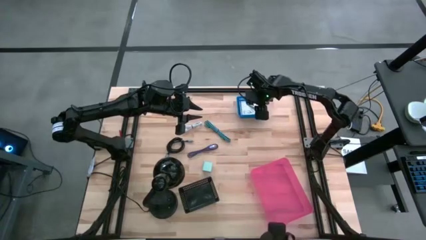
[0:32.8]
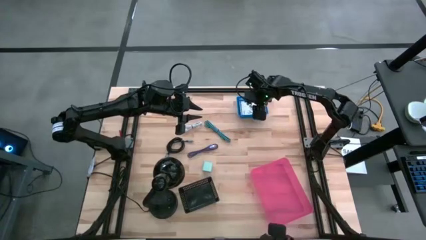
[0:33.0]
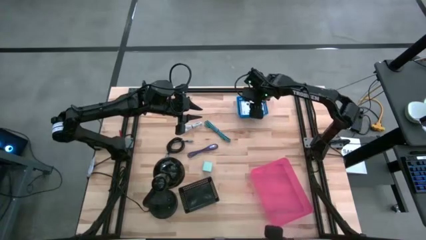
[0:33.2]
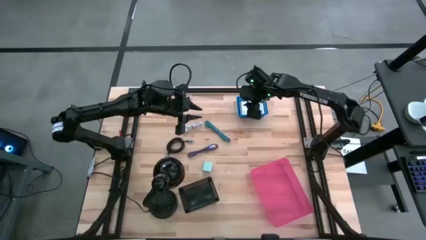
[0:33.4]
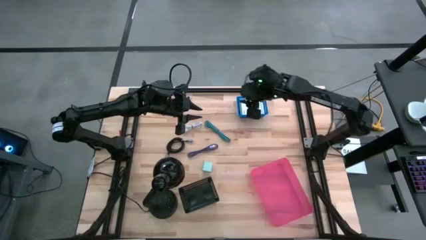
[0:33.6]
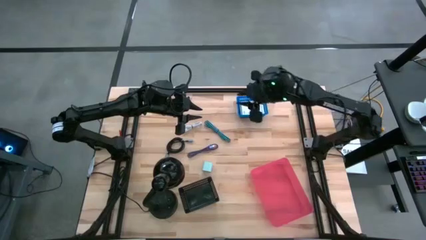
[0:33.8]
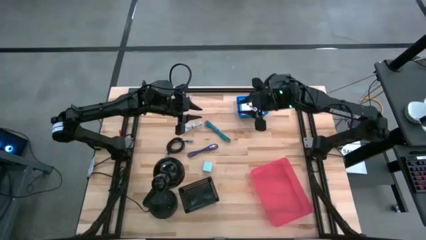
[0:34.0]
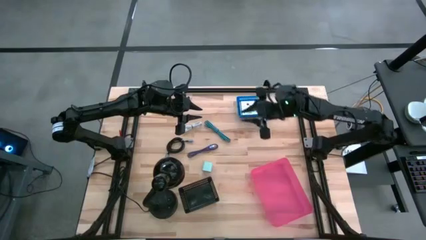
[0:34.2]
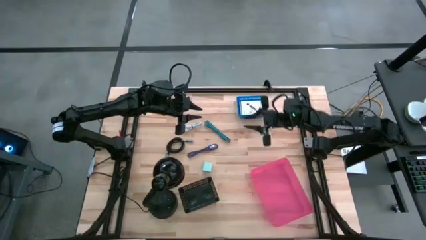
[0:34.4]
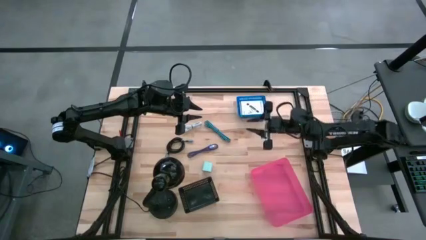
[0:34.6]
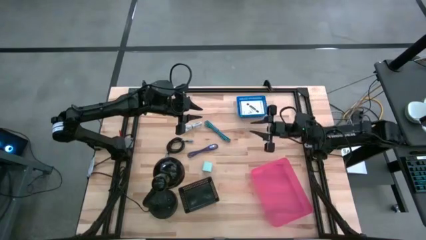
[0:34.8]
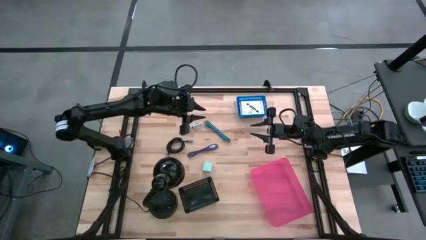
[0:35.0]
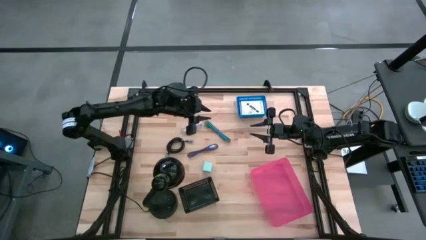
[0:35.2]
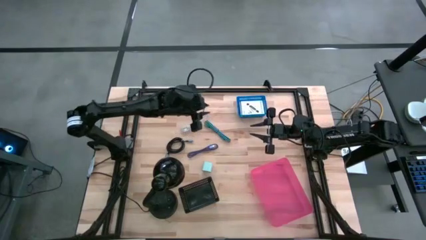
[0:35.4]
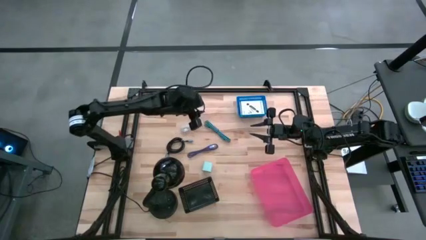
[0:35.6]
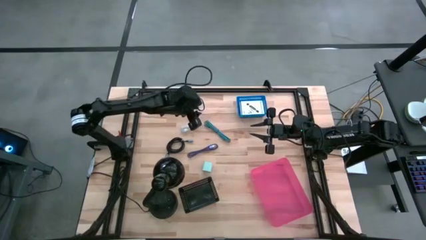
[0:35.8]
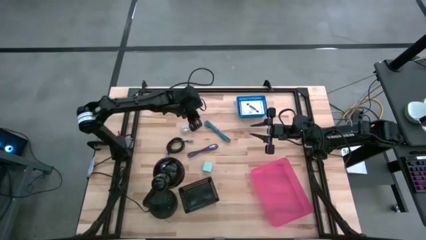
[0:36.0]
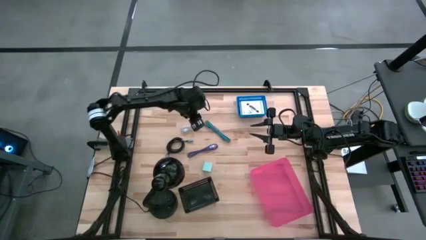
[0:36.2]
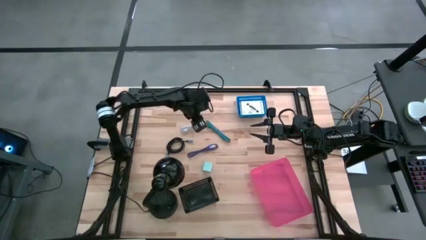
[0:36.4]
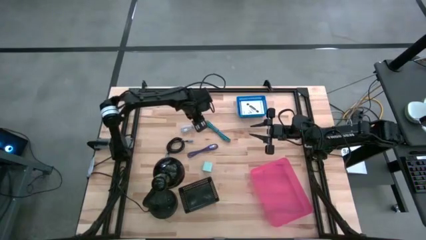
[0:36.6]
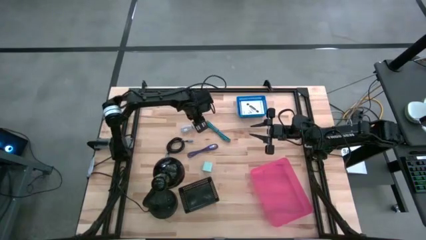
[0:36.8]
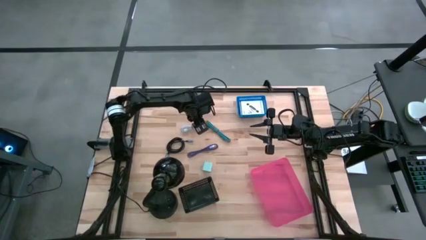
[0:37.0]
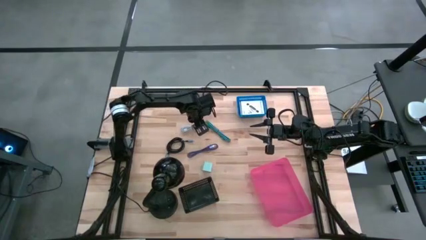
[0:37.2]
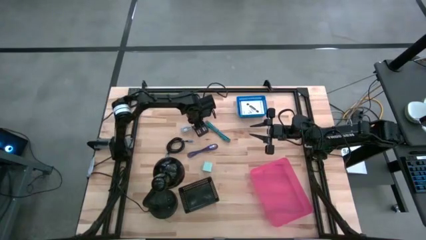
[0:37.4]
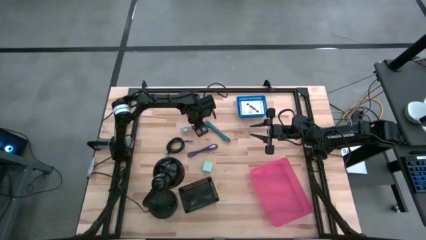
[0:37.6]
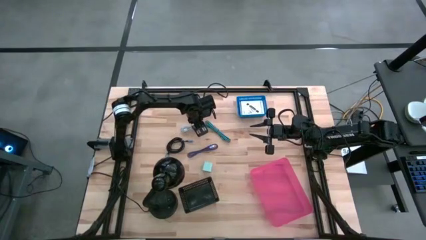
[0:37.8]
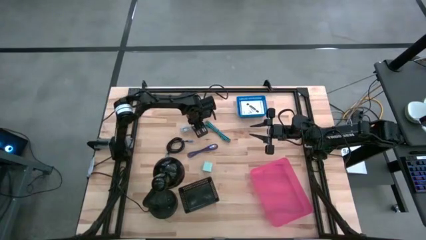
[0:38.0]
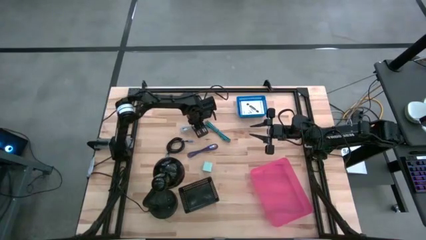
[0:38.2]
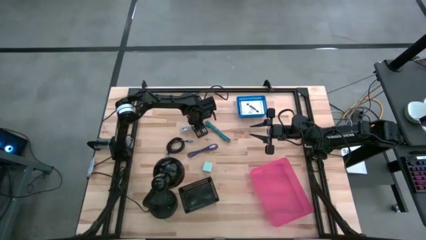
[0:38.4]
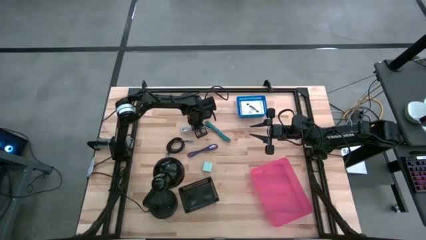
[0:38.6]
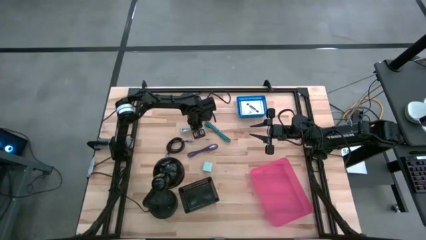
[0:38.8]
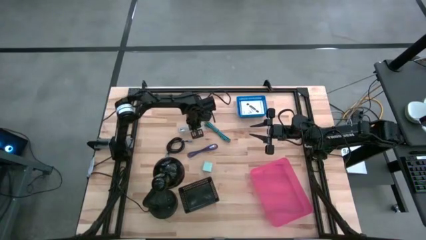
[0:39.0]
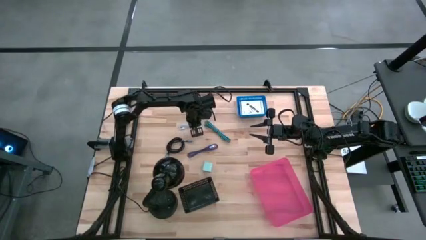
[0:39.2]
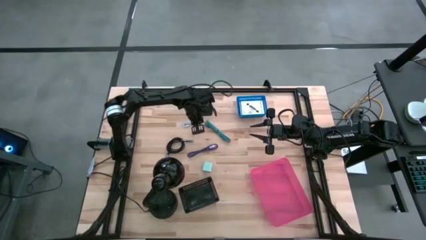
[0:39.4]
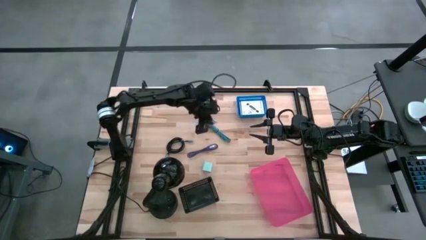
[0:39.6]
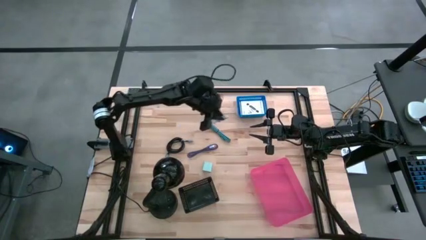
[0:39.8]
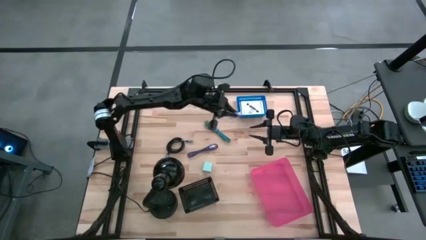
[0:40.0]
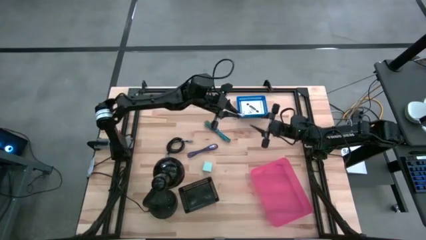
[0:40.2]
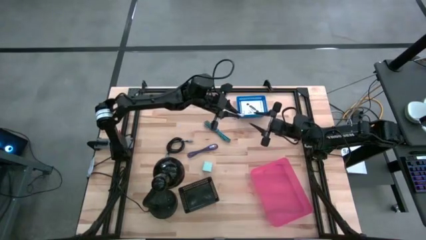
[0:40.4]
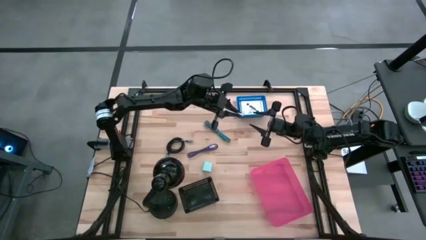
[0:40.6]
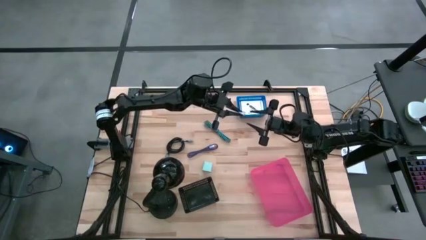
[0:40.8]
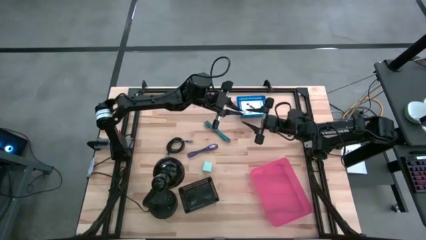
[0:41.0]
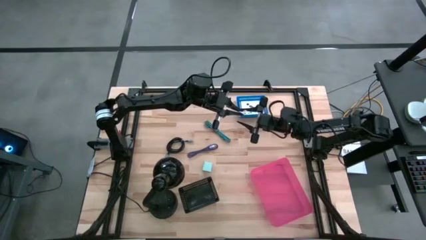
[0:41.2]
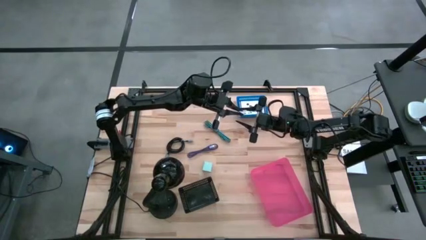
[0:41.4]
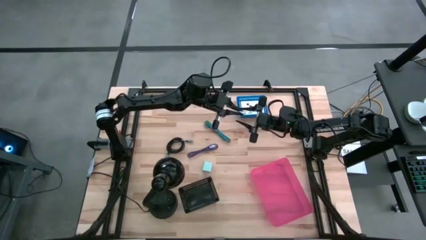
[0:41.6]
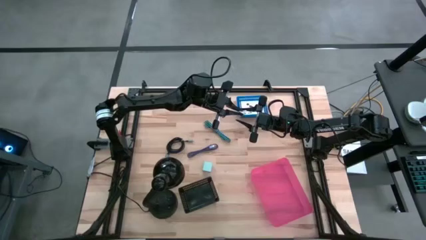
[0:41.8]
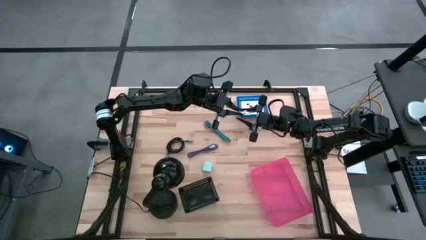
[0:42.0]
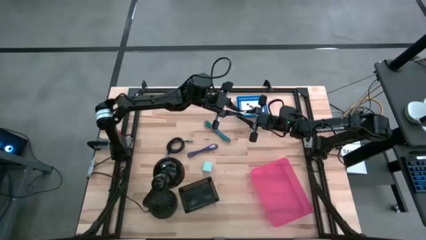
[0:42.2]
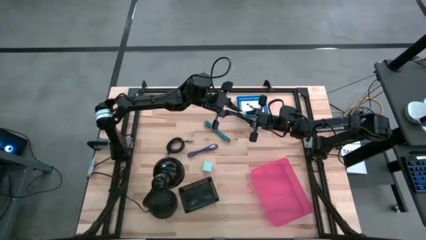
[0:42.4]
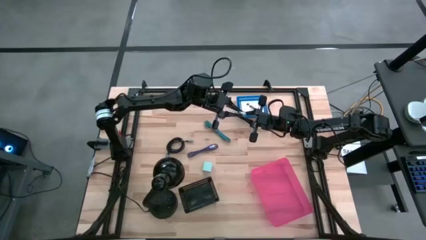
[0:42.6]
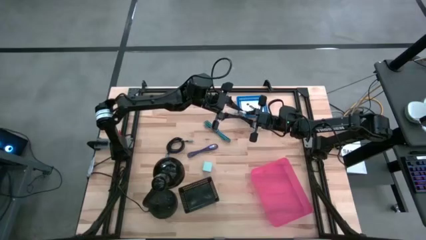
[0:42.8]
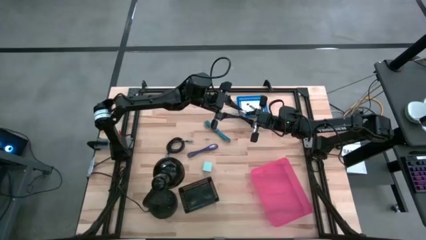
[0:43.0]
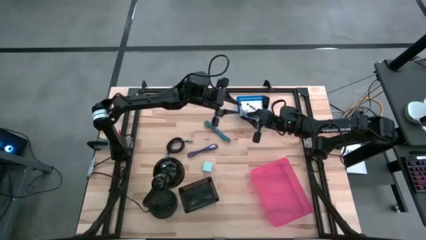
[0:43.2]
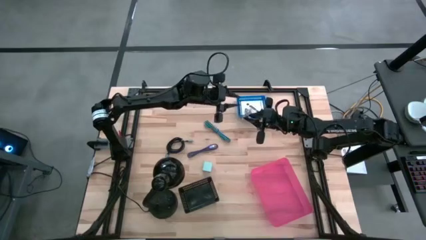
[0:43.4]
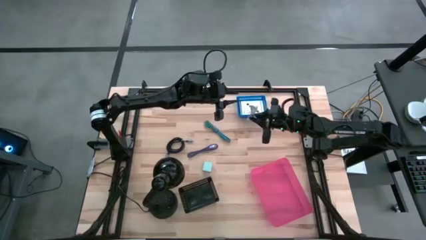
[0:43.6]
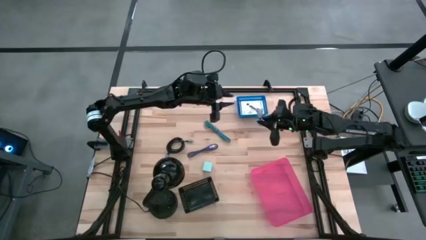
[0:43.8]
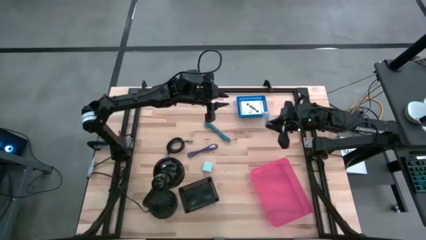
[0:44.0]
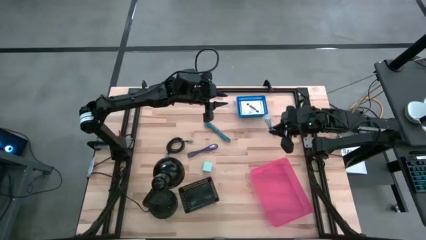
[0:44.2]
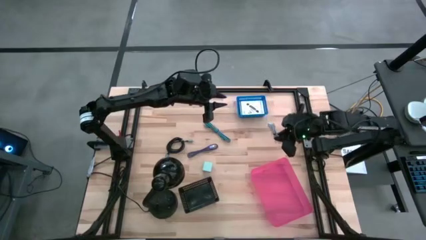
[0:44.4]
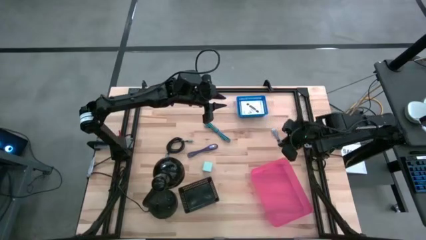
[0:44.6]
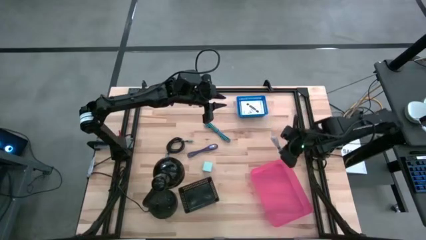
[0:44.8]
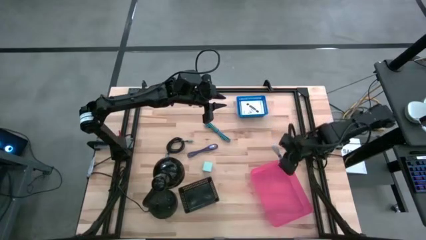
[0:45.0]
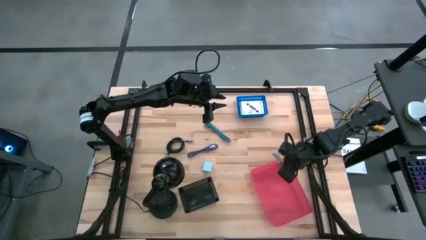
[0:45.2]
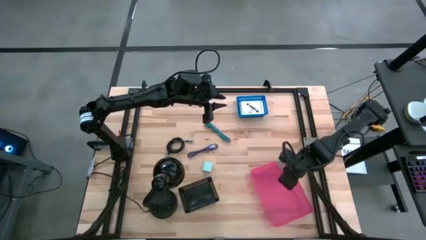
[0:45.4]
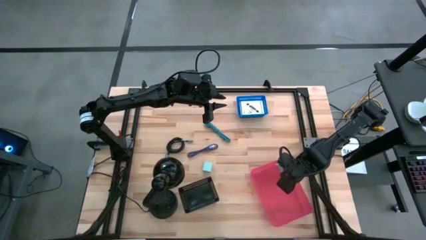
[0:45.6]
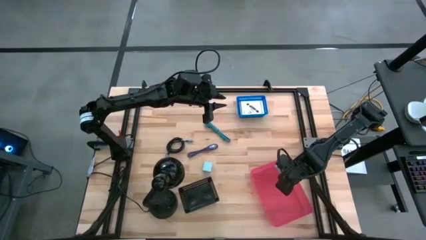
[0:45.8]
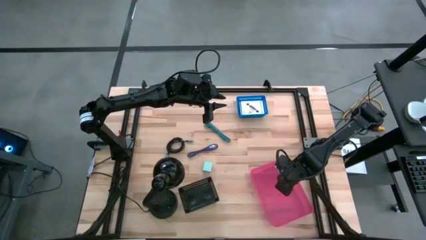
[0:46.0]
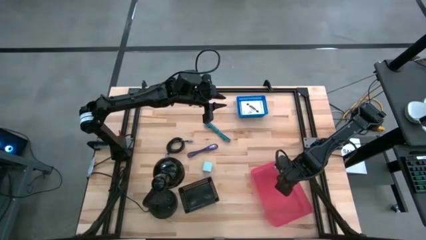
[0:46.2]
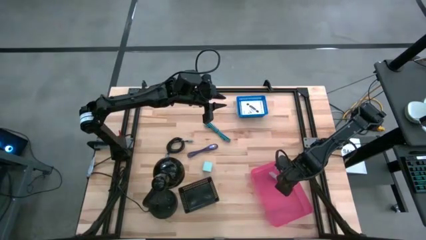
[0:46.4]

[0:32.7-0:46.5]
Task: Pick and place items into bin
Put the white charger cable into the pink bin
